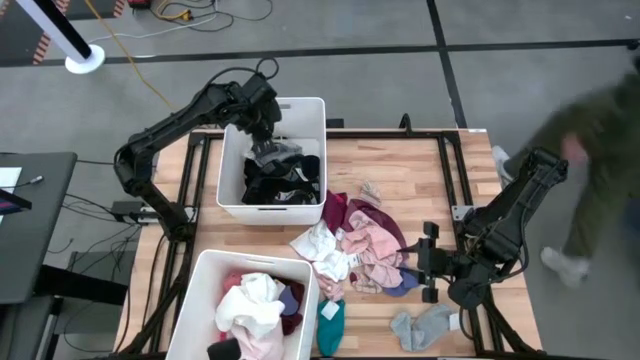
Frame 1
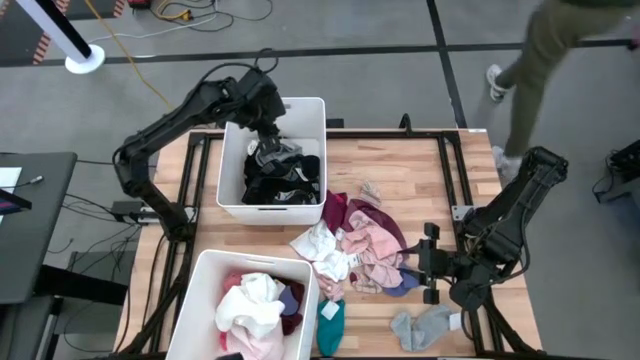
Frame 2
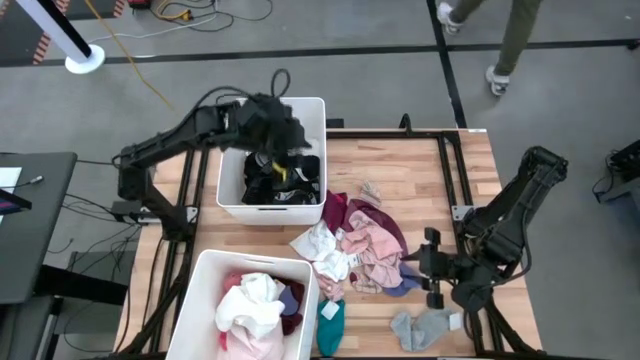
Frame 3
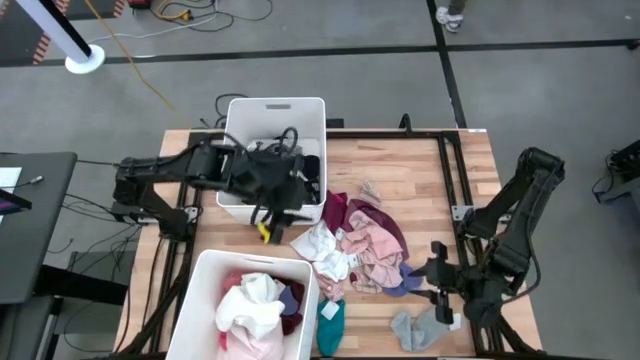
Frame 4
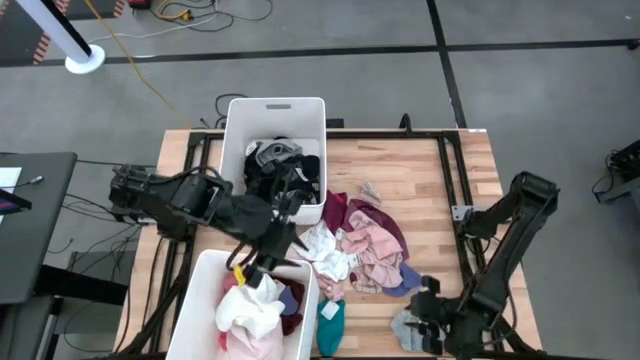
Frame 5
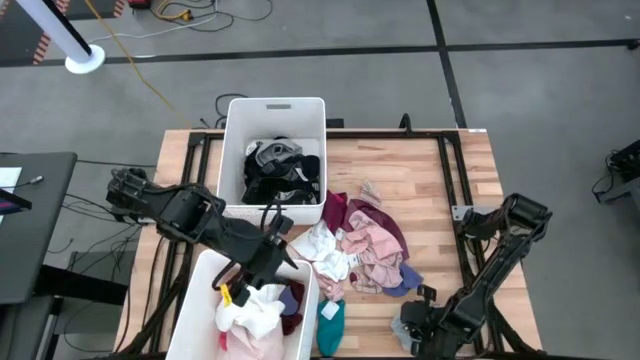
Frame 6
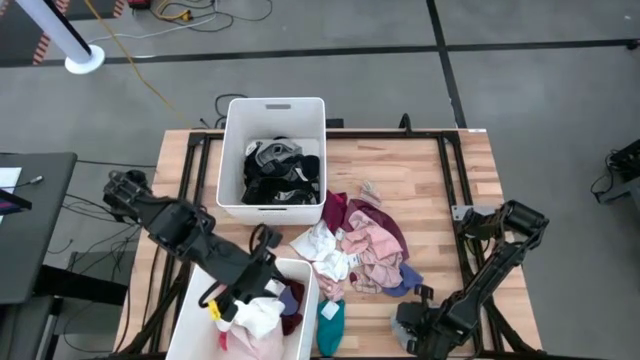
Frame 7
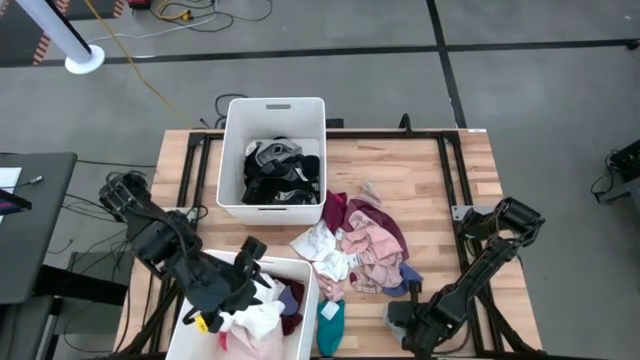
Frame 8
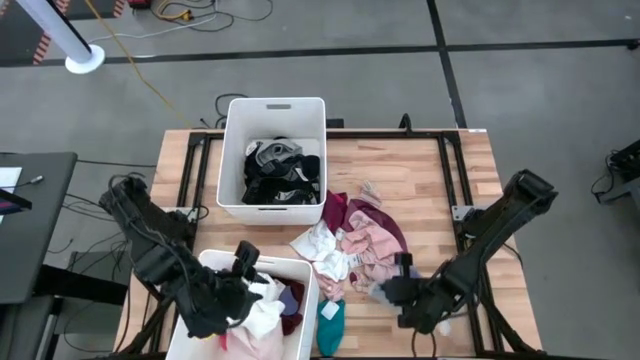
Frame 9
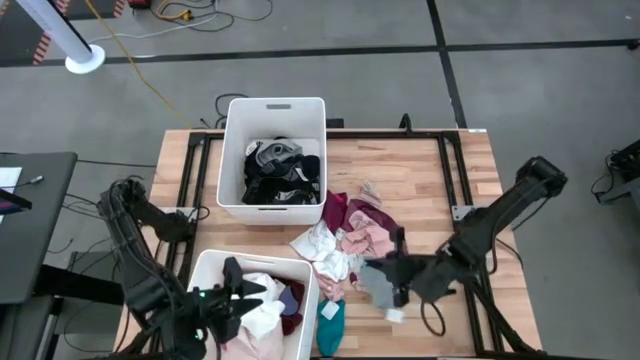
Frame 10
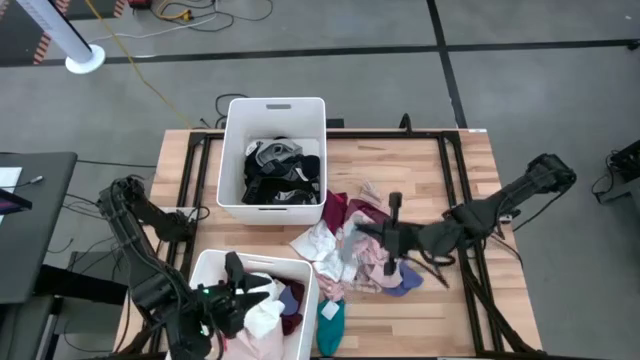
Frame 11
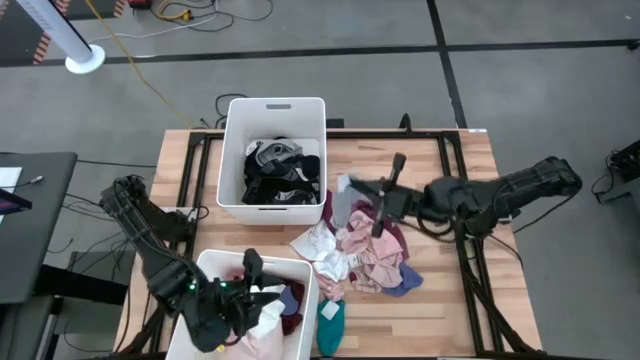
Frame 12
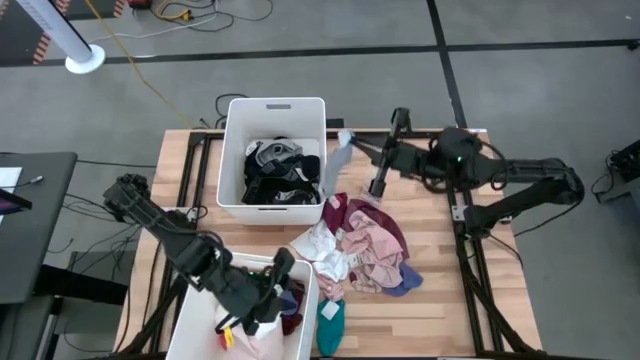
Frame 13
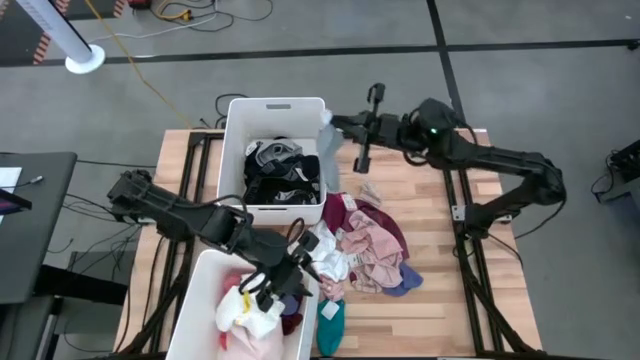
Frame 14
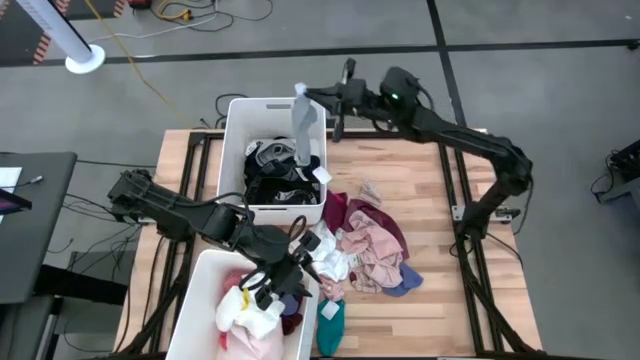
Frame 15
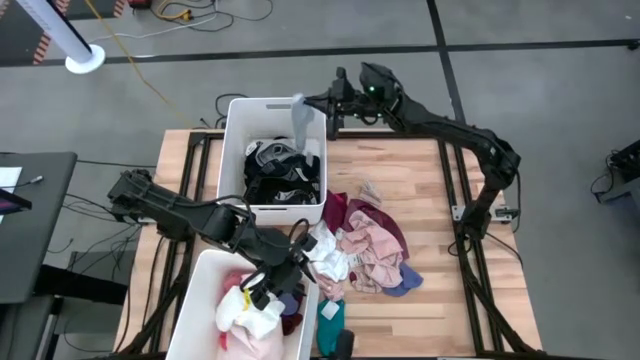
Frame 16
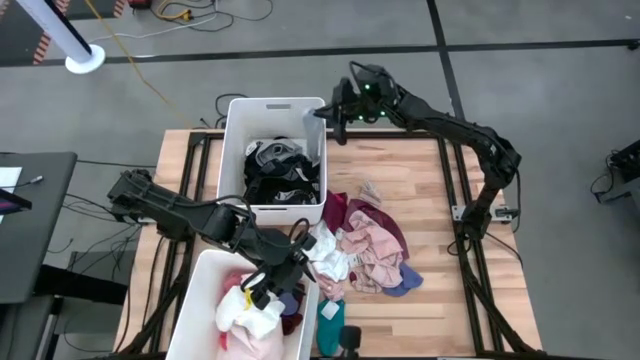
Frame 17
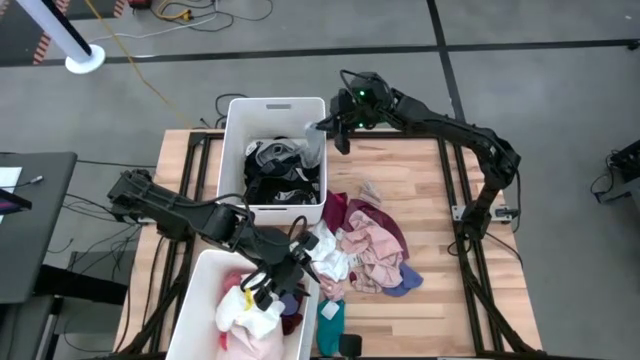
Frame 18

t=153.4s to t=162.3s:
Task: Sort clothes
Put the gray sock into the top white laundry bin

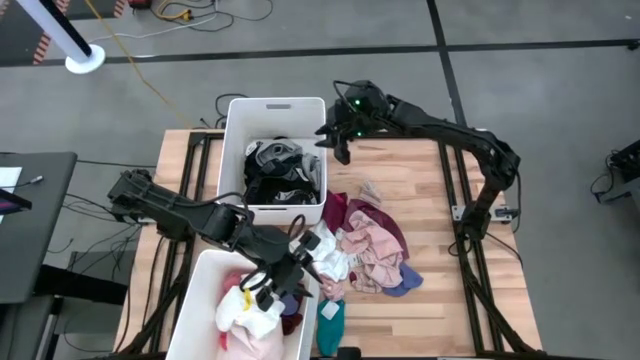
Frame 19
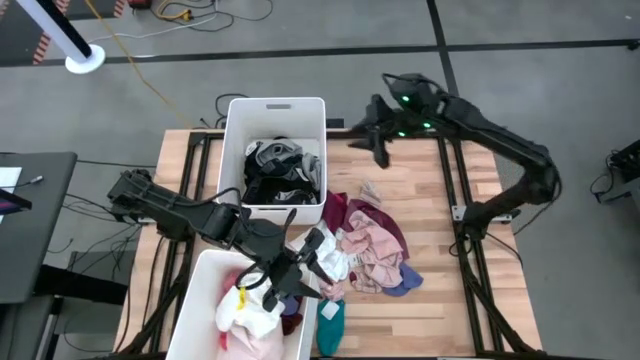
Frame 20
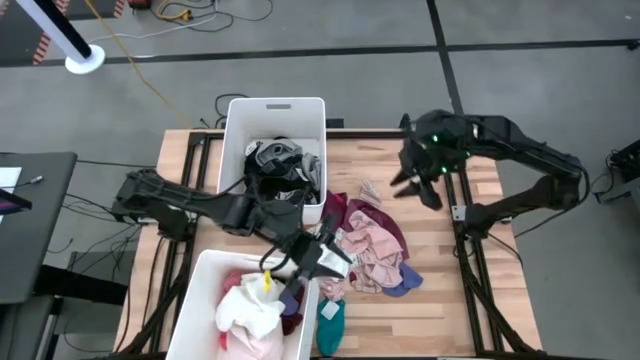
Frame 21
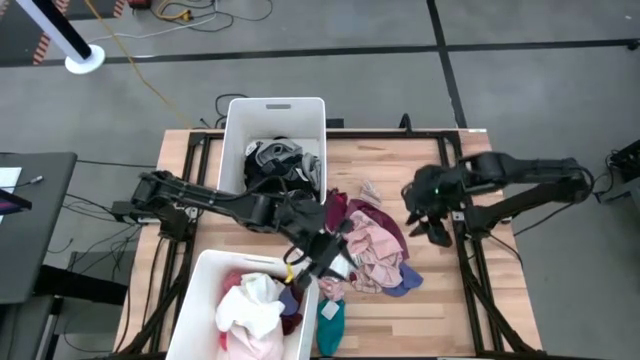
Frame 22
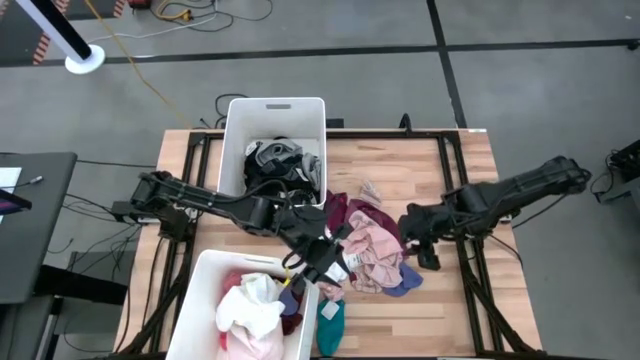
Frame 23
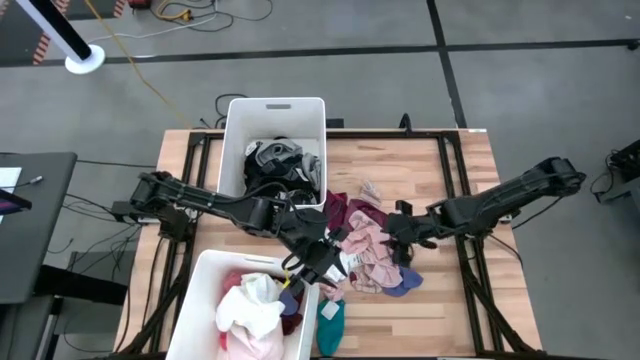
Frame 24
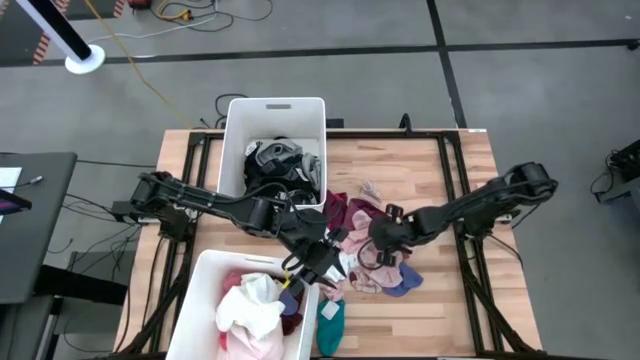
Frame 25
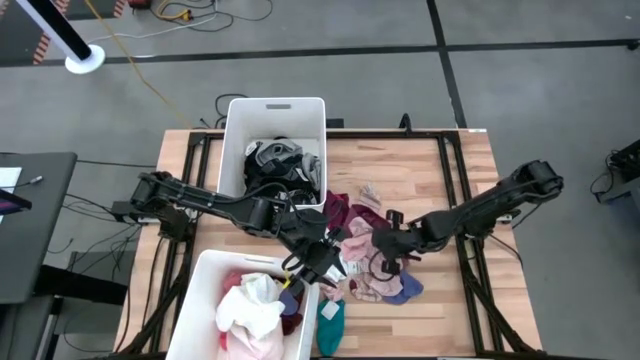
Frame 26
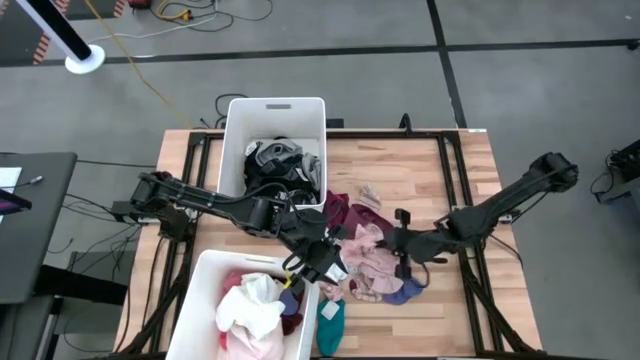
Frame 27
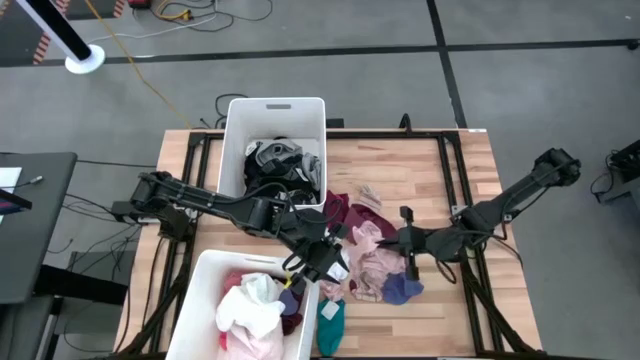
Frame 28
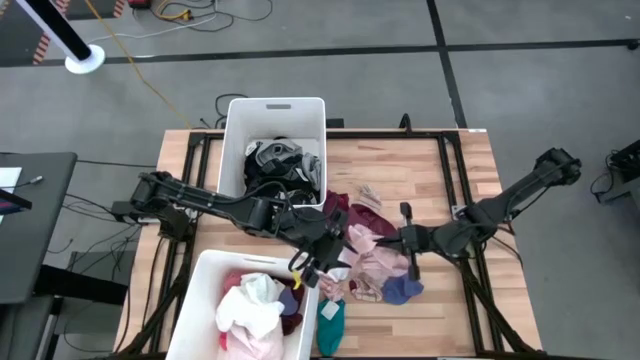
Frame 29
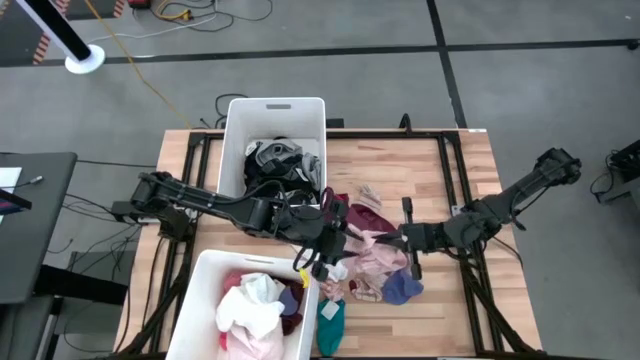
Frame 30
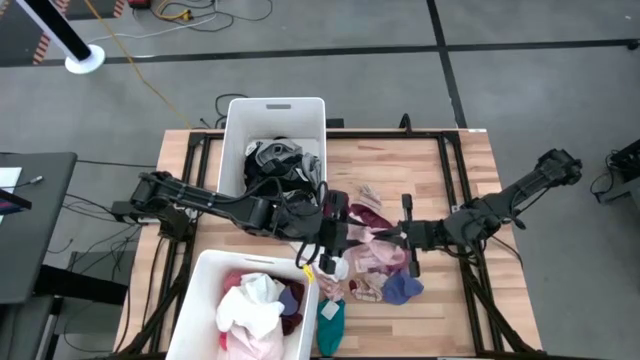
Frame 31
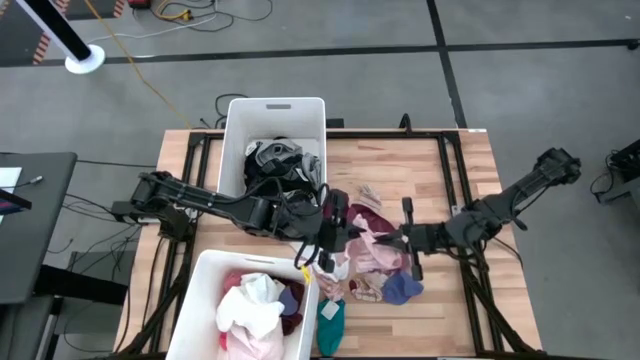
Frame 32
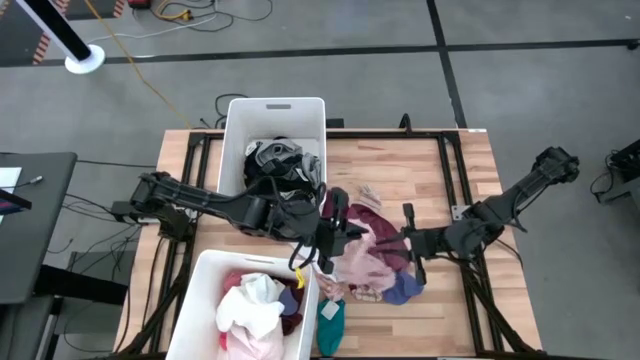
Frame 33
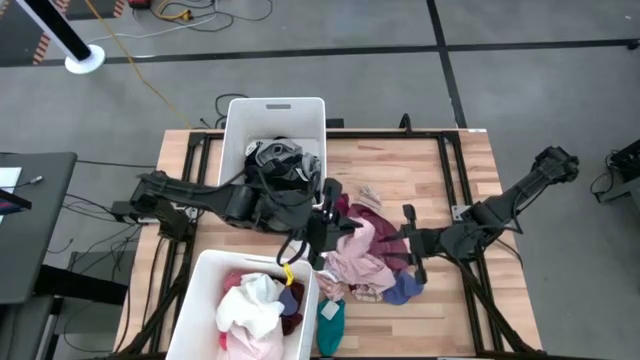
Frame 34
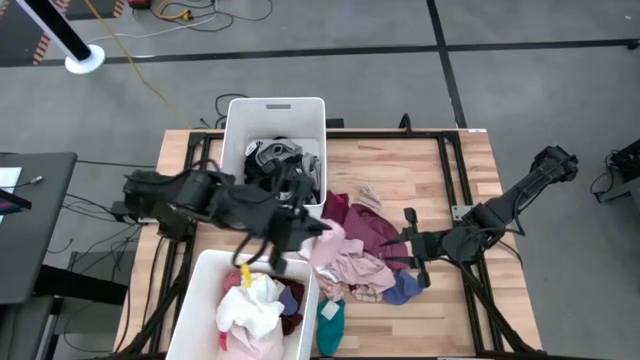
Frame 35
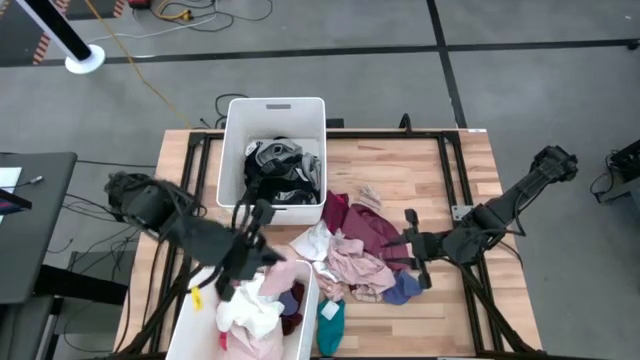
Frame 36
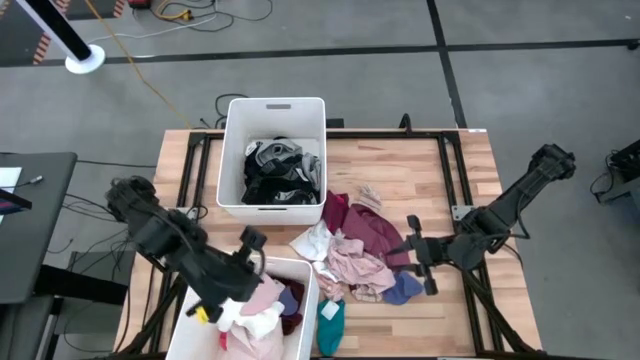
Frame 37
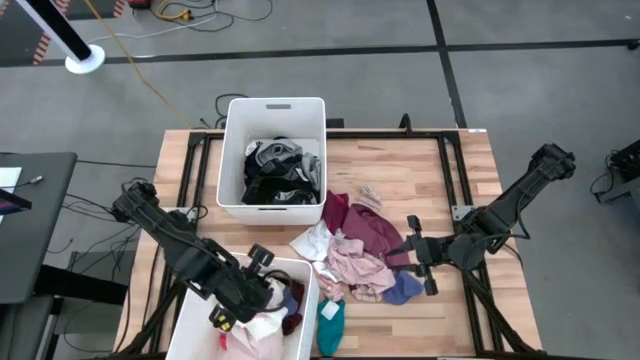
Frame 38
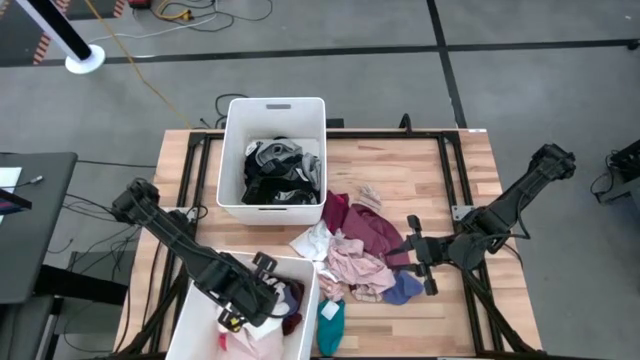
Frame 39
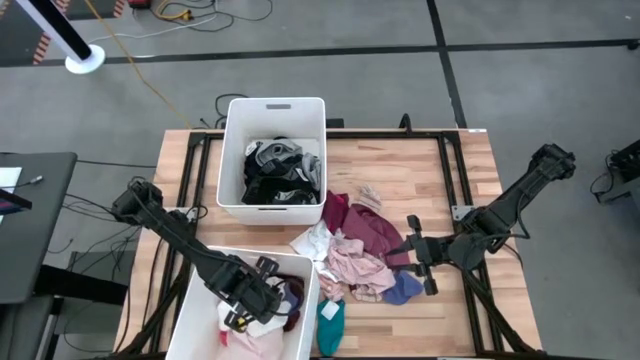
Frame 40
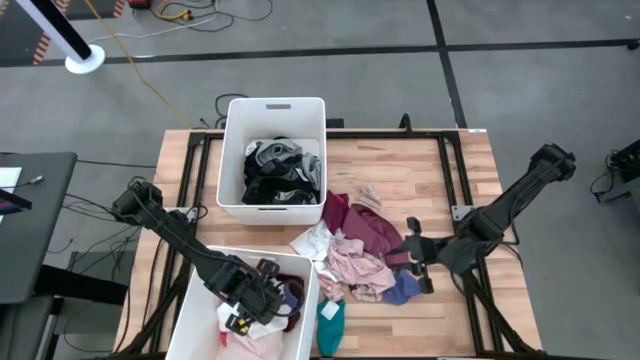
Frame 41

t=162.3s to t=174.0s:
Put the pink underwear into the bottom white laundry bin
